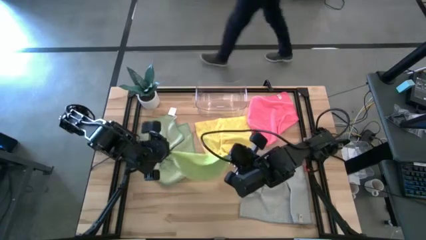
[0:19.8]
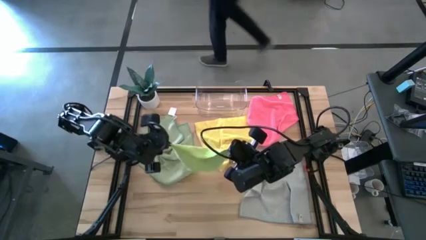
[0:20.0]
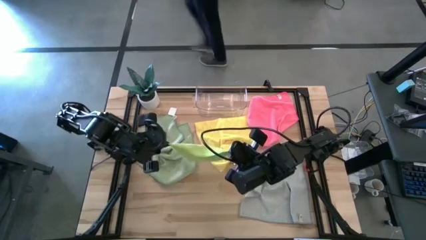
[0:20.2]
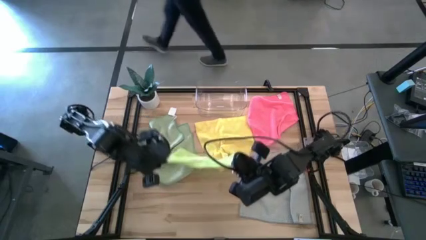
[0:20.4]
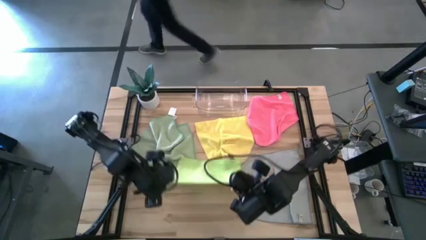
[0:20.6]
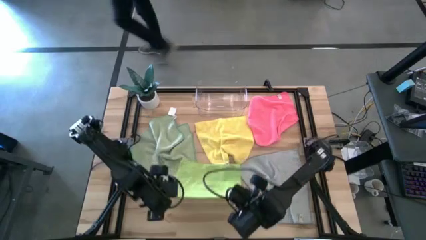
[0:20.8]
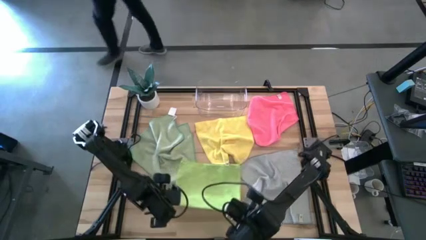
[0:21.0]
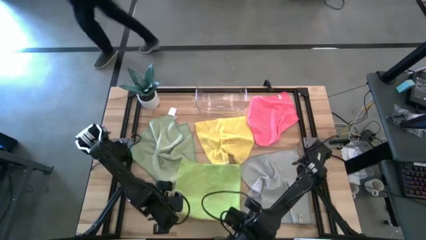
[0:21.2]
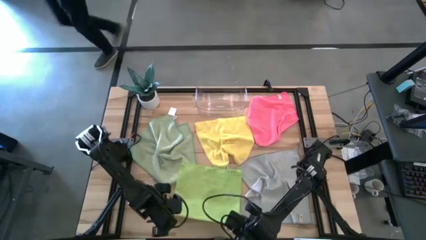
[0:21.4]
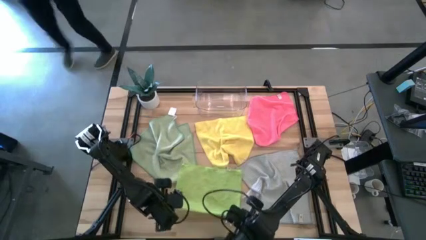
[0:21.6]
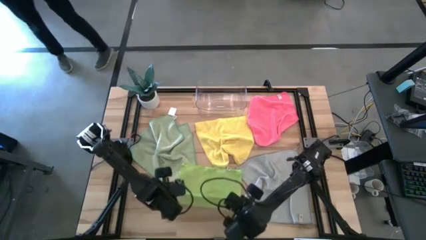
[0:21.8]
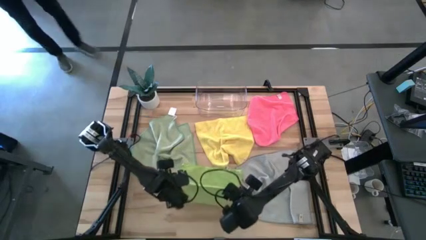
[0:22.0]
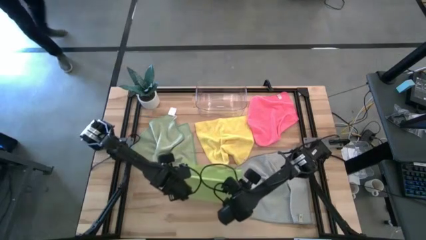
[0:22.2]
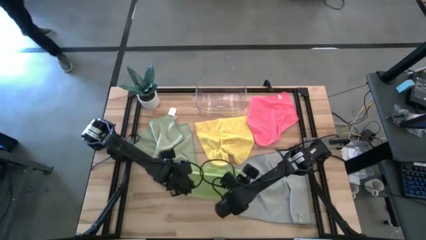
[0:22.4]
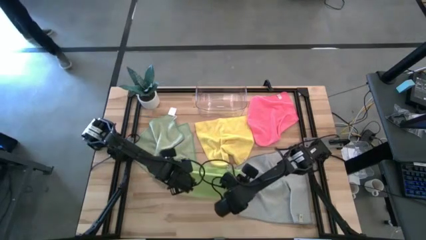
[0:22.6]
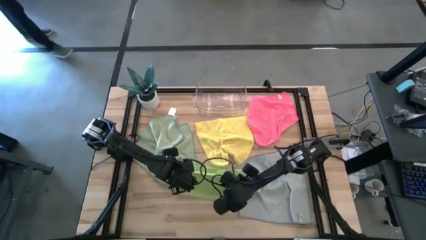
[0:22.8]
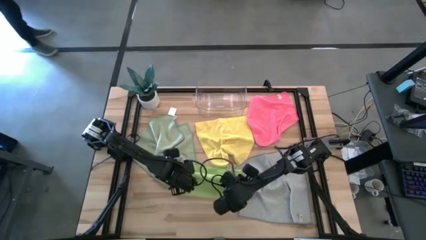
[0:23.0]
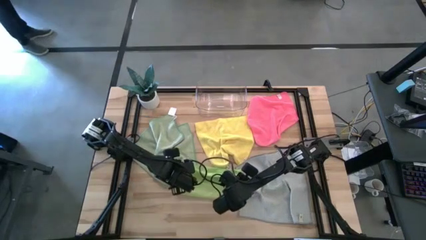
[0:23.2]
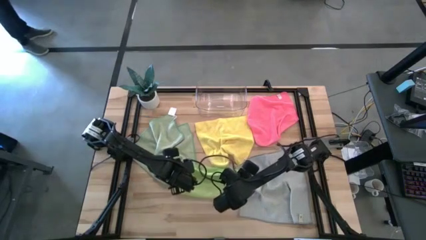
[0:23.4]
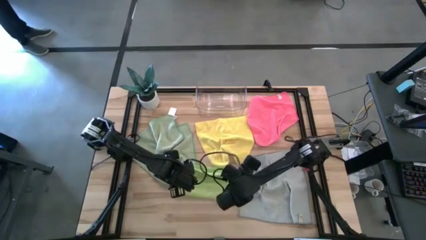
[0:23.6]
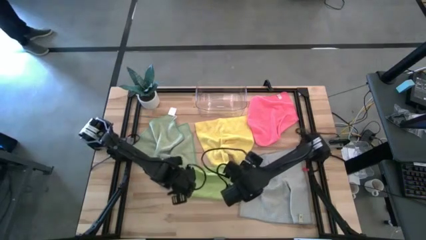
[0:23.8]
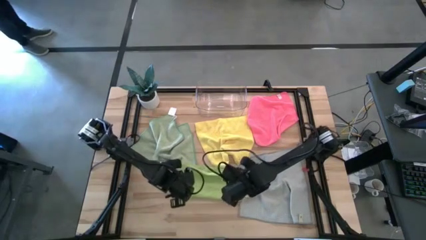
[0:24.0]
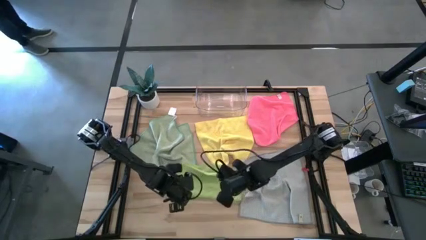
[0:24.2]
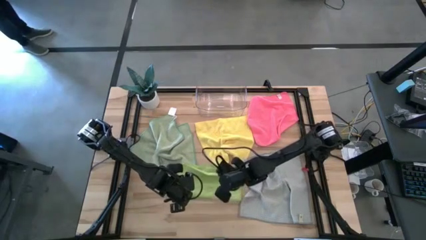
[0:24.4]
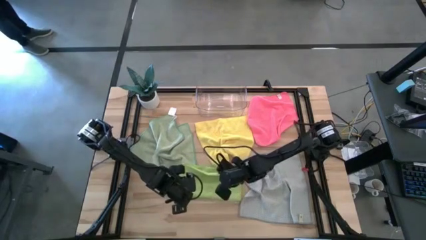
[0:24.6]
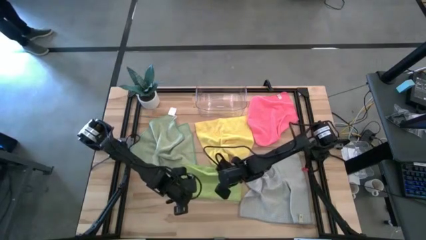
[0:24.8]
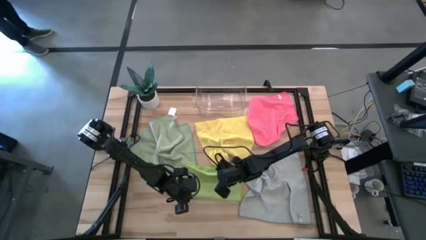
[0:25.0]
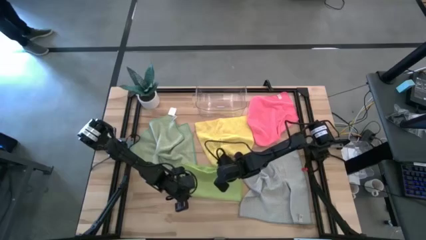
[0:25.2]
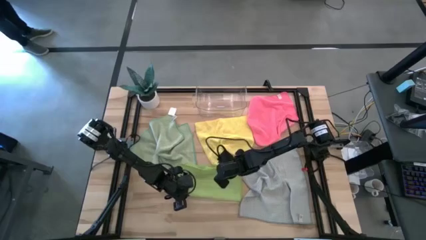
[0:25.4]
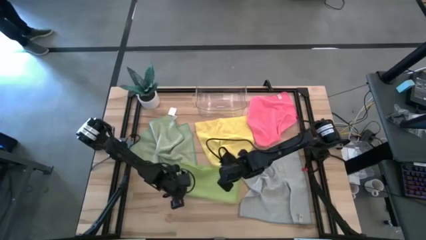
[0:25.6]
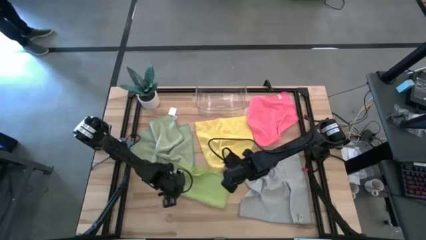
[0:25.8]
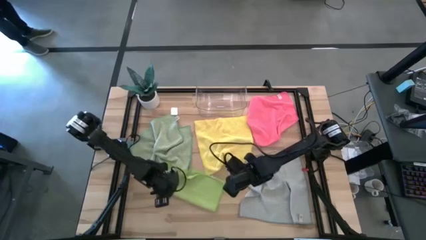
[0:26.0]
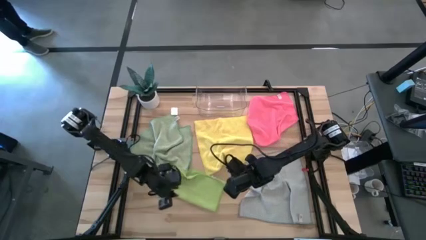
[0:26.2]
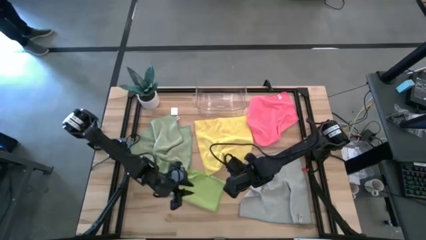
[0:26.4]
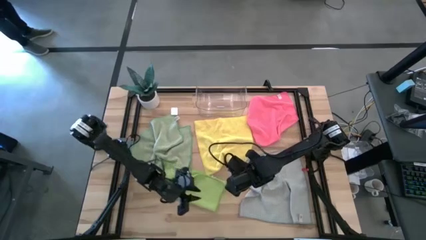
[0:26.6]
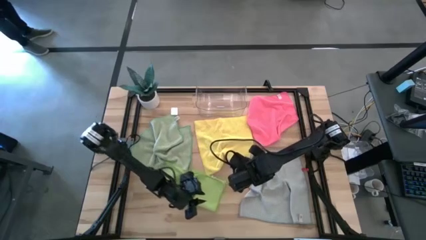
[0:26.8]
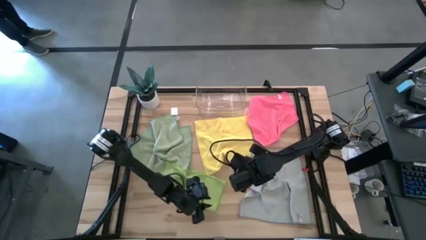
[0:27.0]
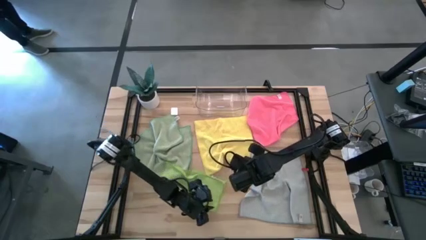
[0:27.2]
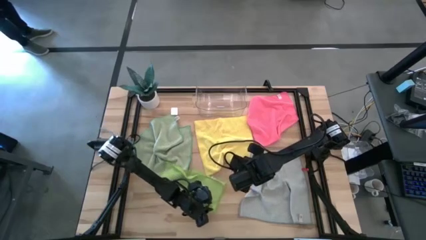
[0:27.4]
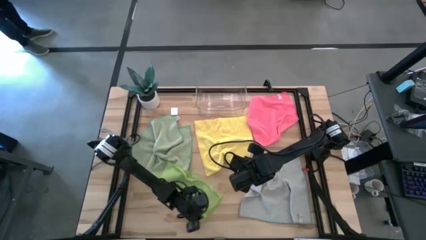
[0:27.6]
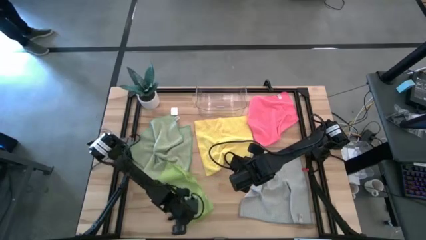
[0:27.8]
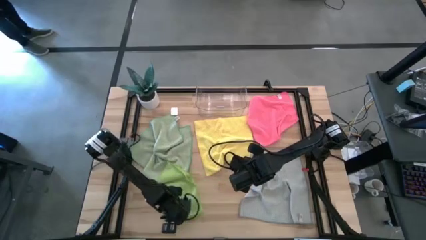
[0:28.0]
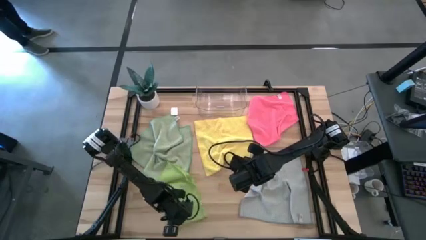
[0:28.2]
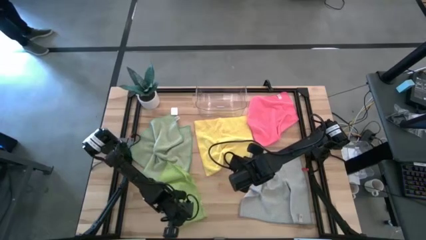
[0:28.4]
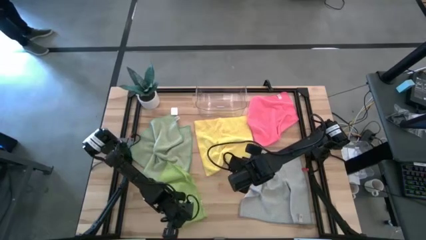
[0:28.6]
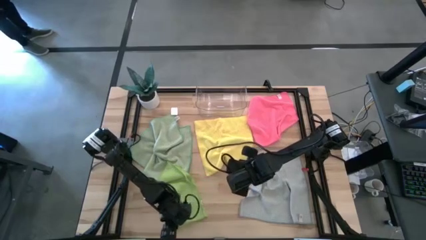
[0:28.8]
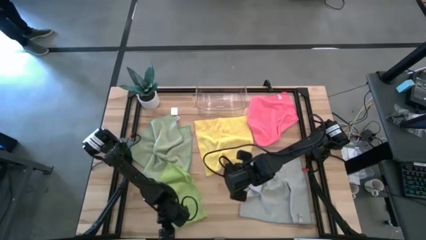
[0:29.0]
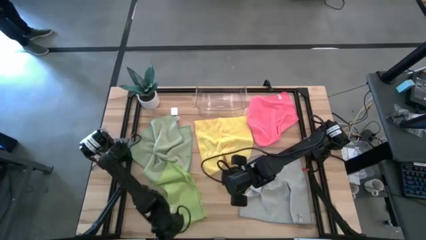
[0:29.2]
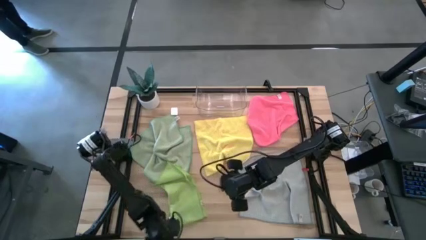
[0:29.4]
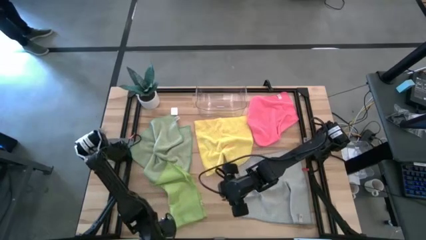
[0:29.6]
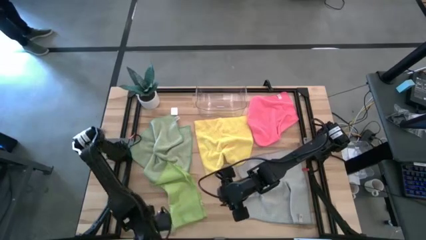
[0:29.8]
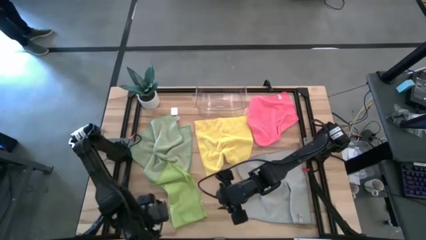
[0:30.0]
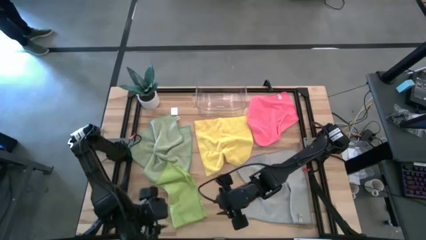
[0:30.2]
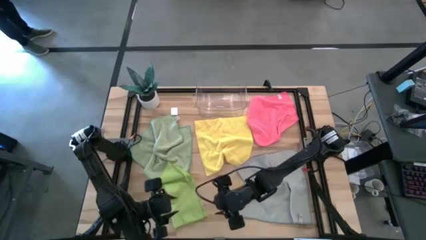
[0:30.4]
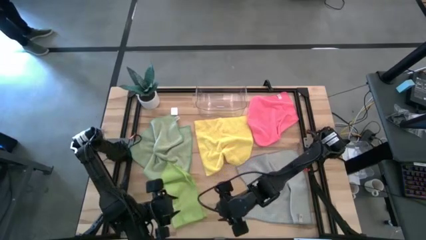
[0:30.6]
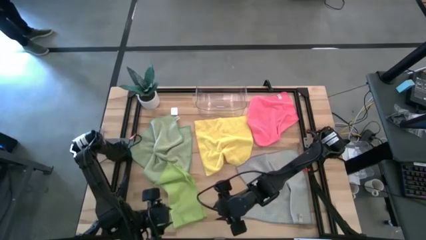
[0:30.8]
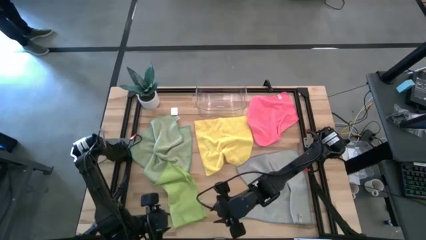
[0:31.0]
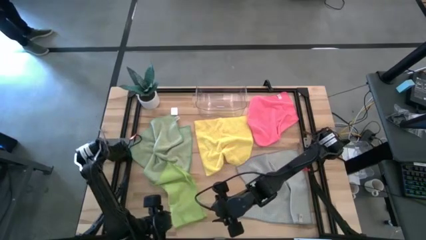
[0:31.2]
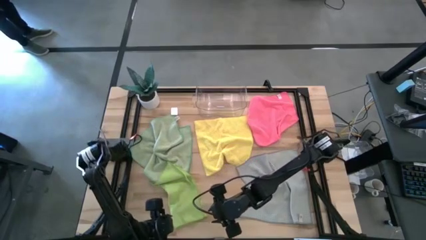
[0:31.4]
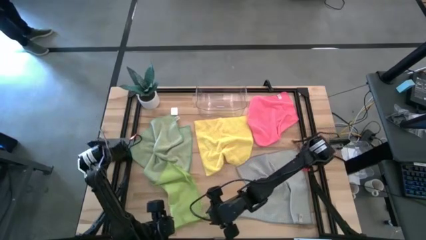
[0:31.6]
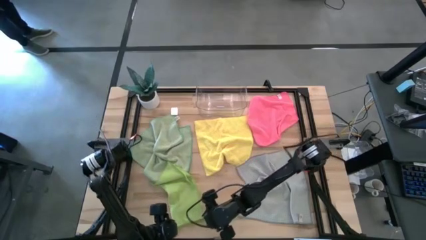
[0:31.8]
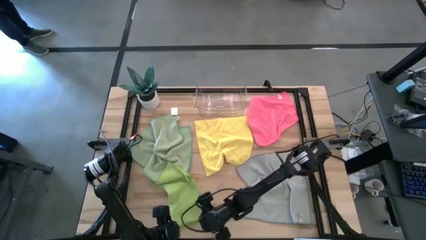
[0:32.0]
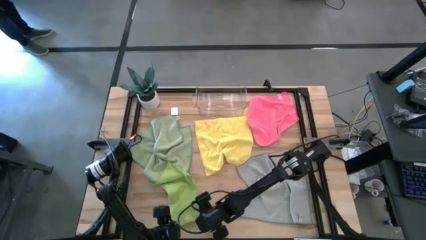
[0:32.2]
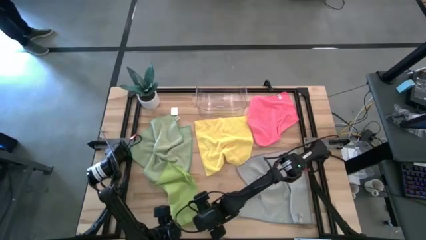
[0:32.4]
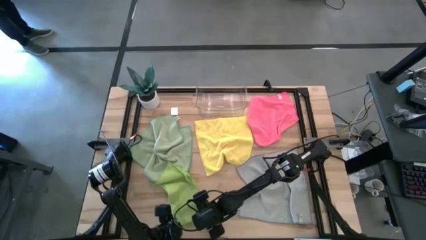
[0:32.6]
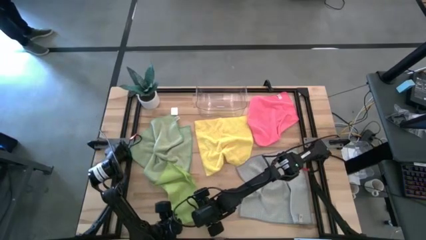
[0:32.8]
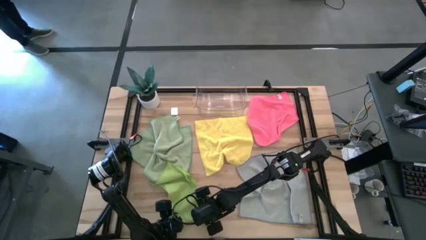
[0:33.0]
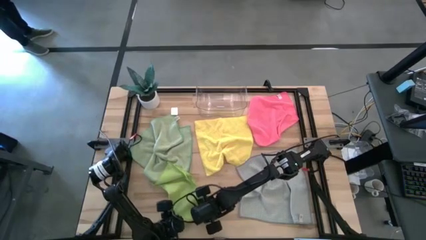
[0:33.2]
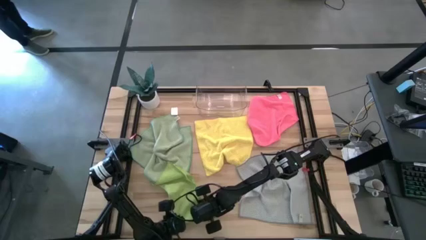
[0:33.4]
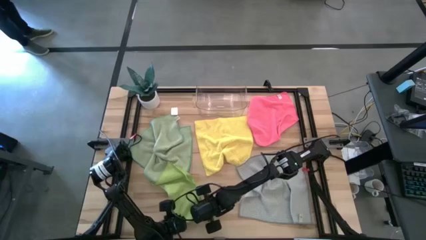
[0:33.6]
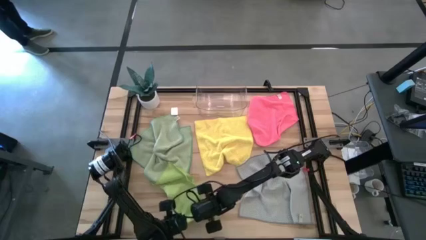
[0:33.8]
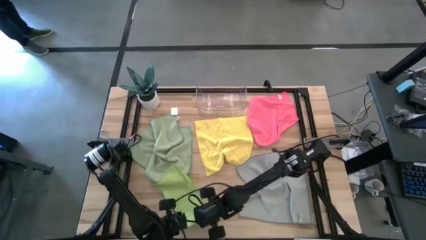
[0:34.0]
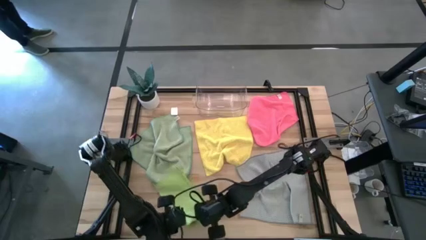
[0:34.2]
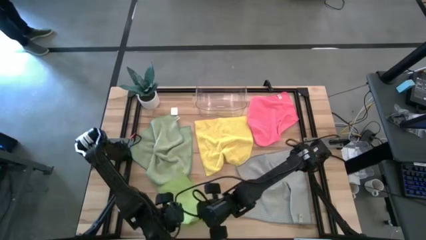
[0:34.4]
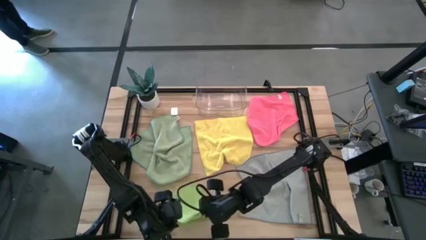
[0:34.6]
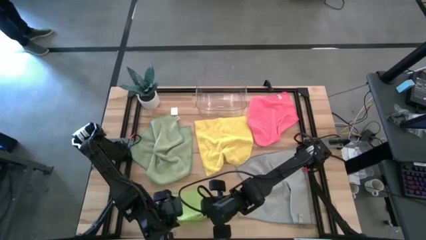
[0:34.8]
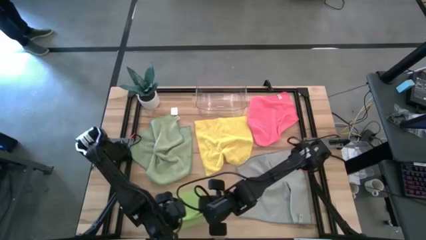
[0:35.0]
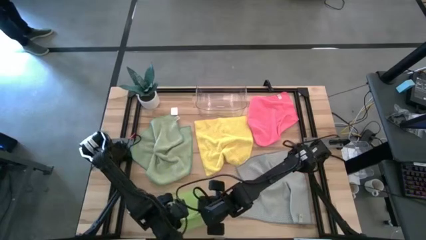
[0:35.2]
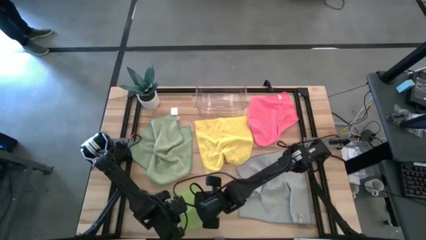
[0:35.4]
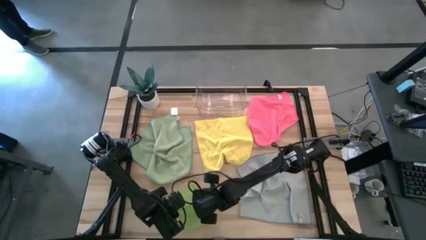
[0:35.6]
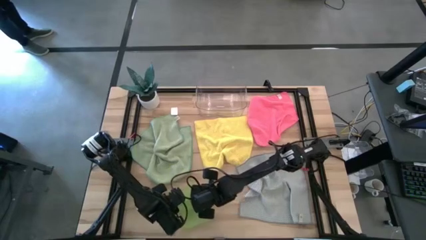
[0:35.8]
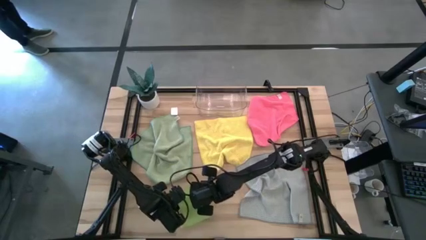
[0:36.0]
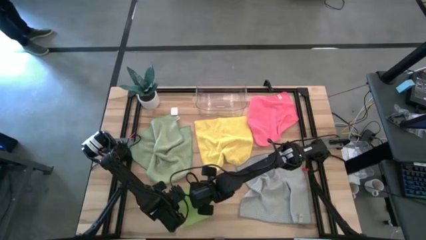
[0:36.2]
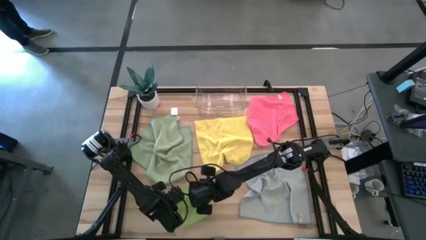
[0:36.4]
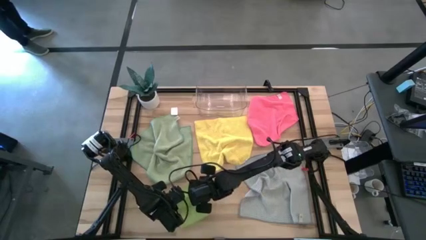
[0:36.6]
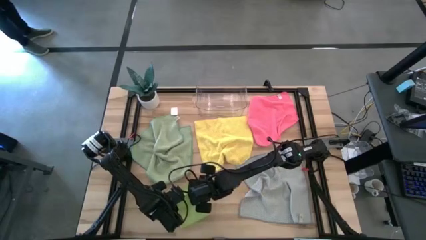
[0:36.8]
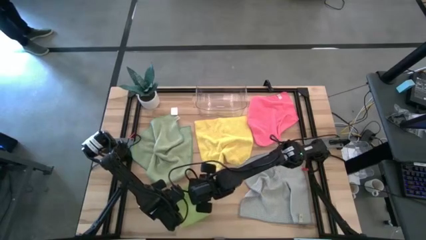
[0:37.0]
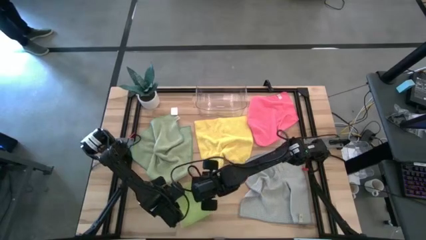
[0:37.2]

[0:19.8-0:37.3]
Task: Fold microfiber towels
Fold the green microfiber cloth
